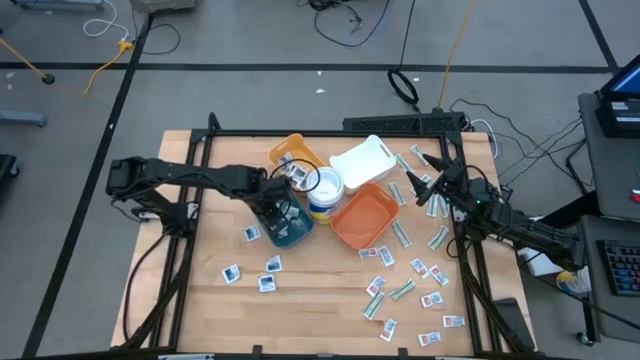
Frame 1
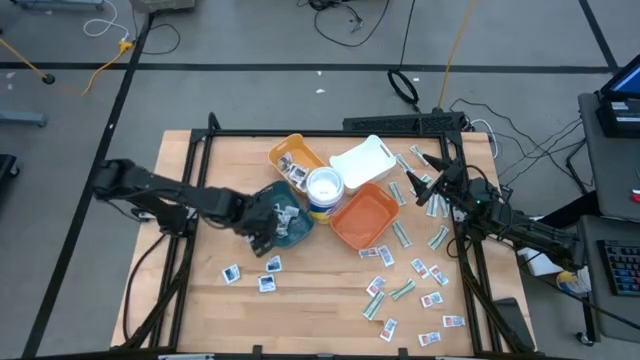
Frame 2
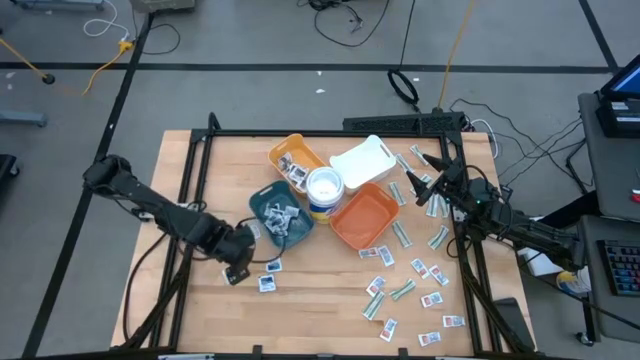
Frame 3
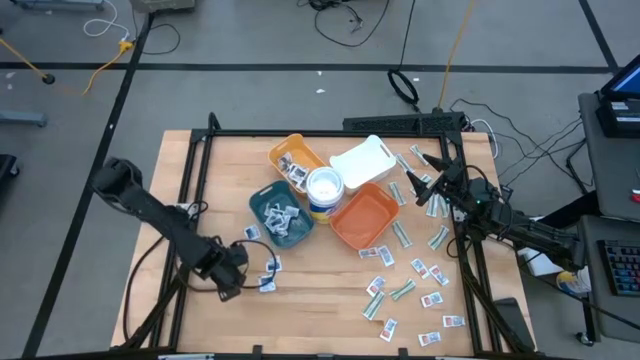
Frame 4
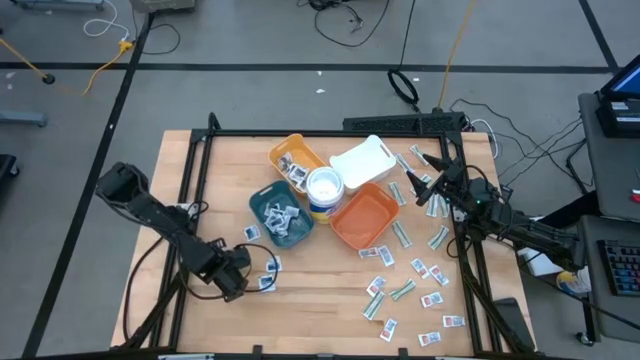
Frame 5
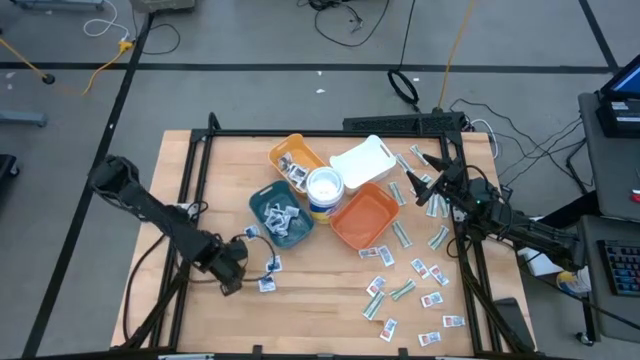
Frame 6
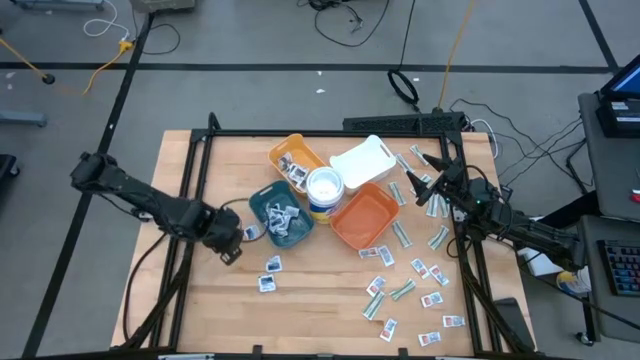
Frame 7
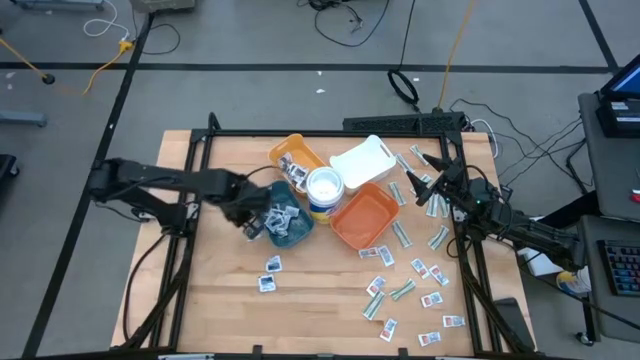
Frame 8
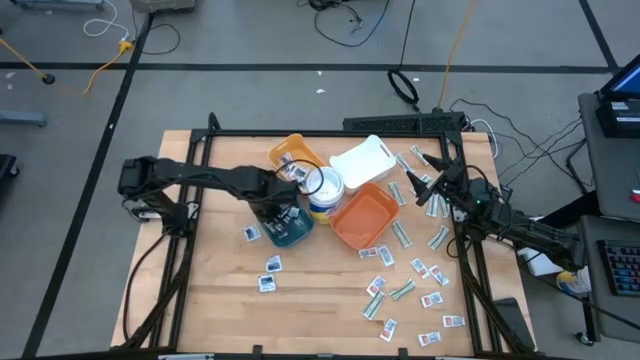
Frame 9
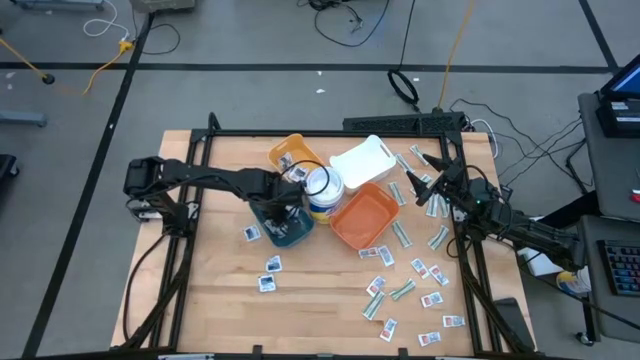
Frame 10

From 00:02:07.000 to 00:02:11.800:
Task: Pick & Place First Aid Supplies
Put the blue pad into the blue bin

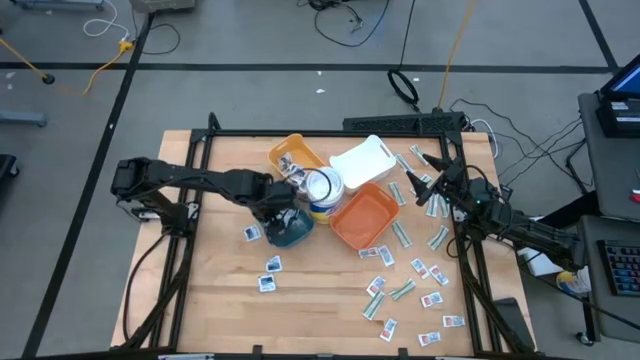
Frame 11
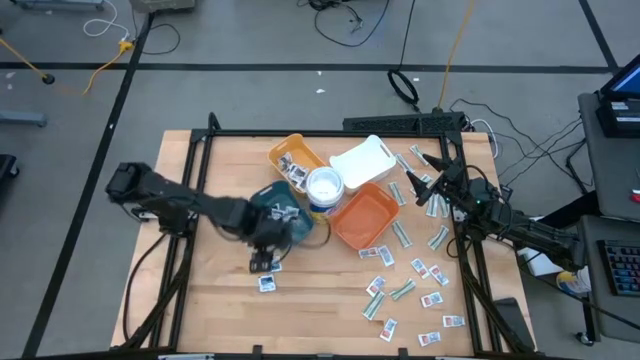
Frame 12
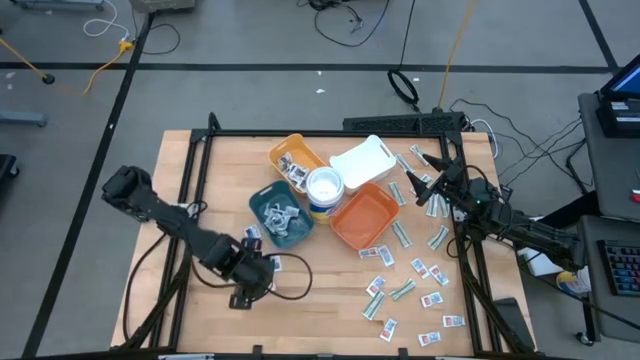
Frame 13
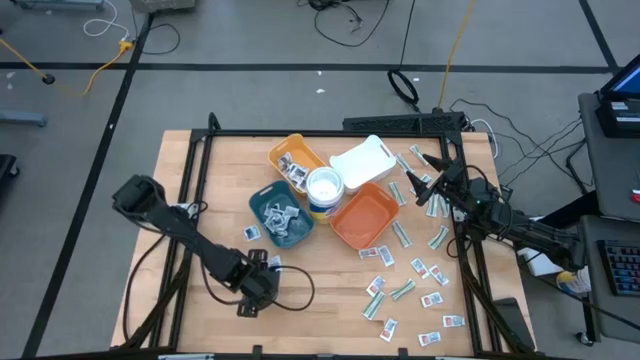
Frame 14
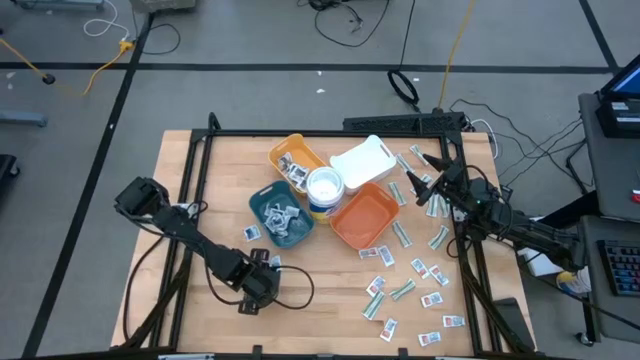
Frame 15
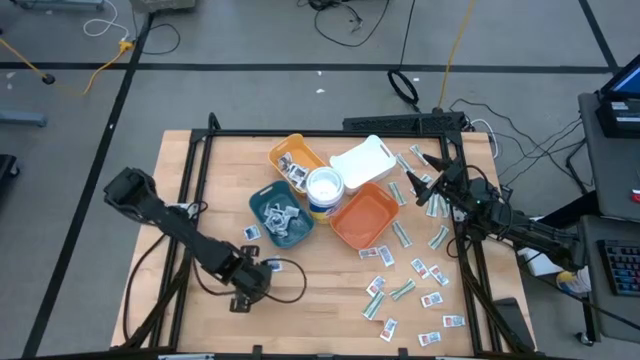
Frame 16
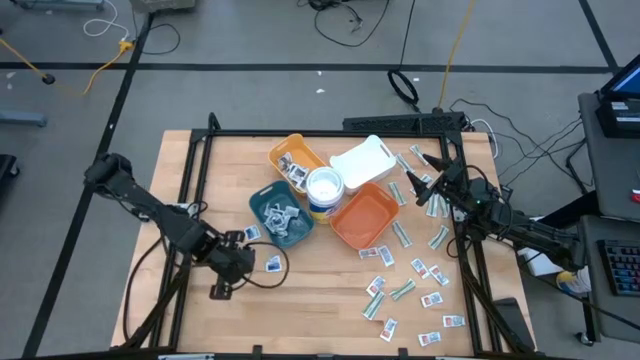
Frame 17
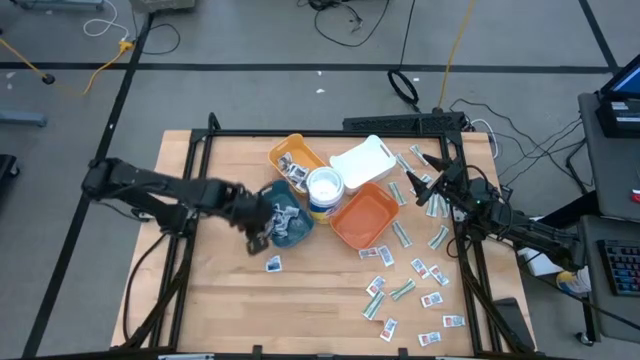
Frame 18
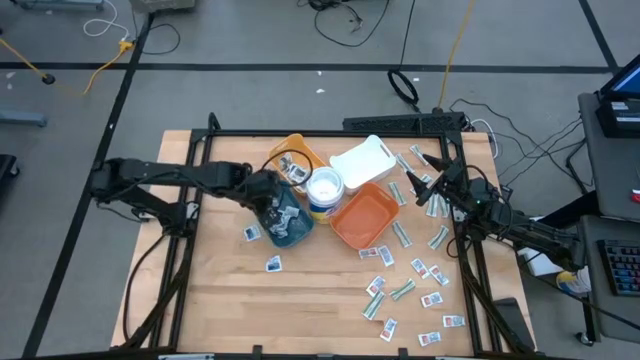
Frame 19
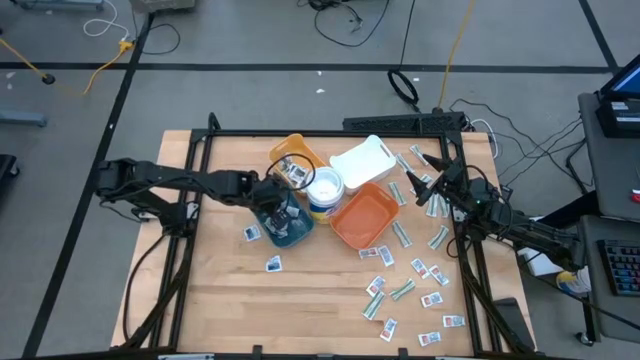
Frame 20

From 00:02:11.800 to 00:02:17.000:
Put the blue pad into the blue bin

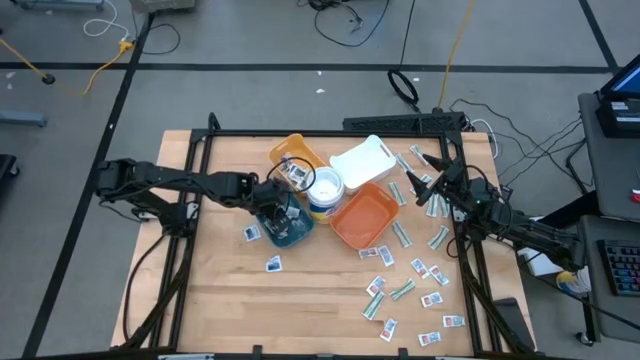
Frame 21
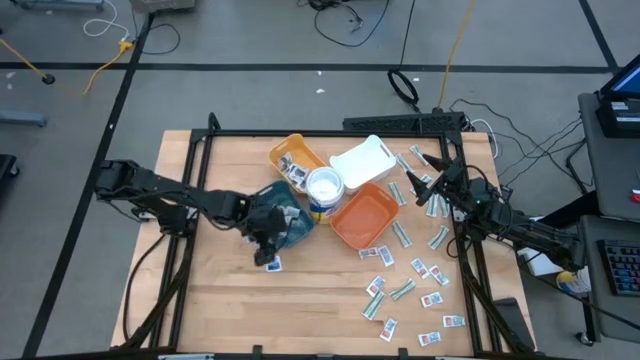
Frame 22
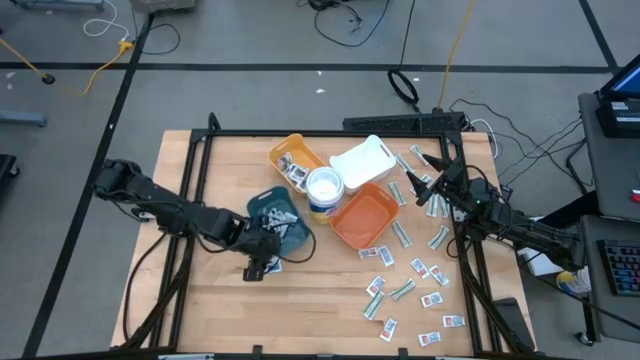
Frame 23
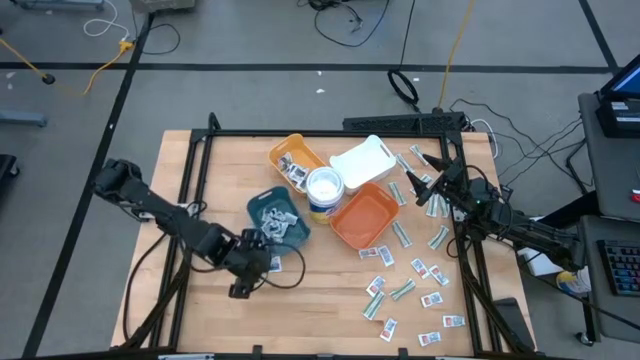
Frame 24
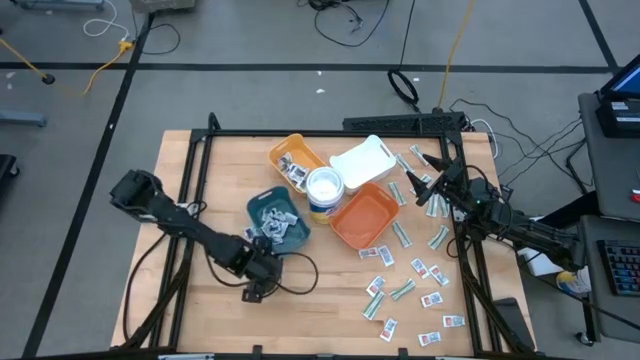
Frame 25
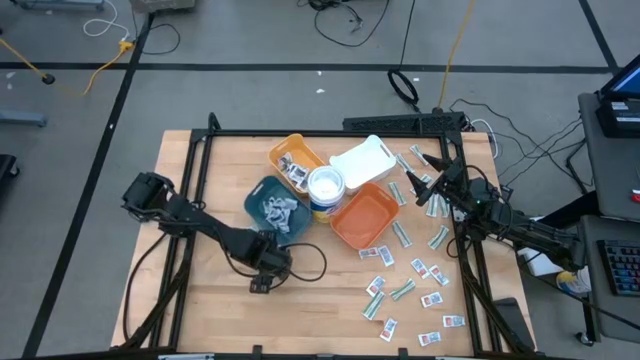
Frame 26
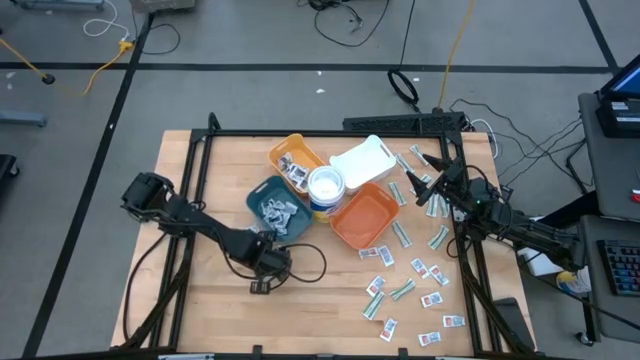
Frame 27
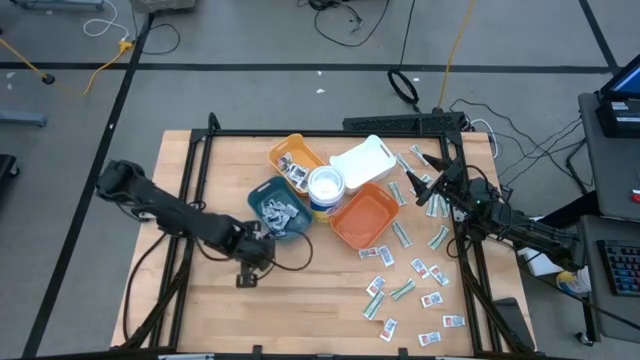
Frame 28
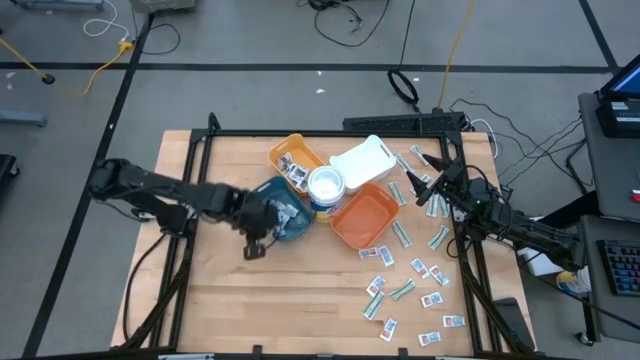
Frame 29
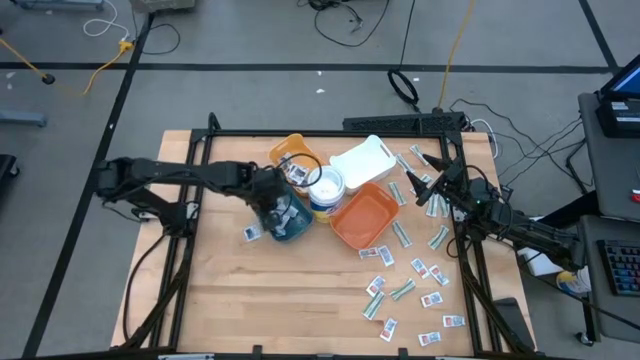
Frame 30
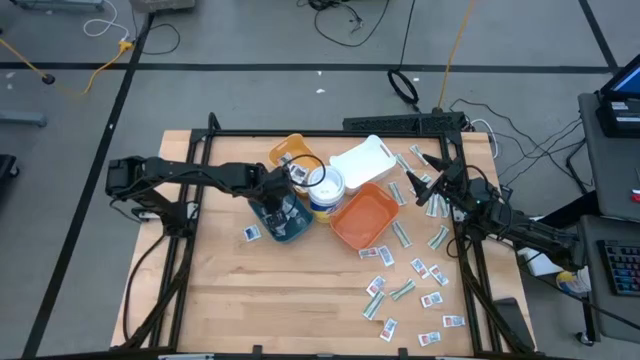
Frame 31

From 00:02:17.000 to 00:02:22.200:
Put the blue pad into the blue bin

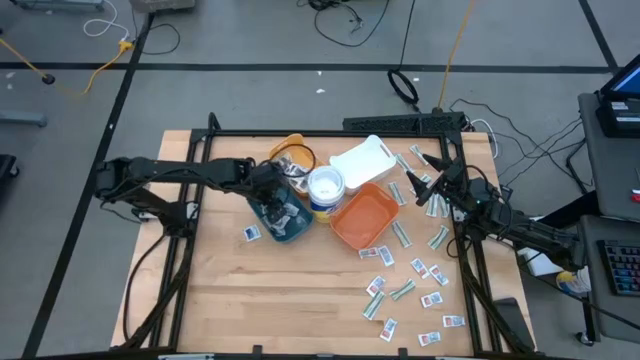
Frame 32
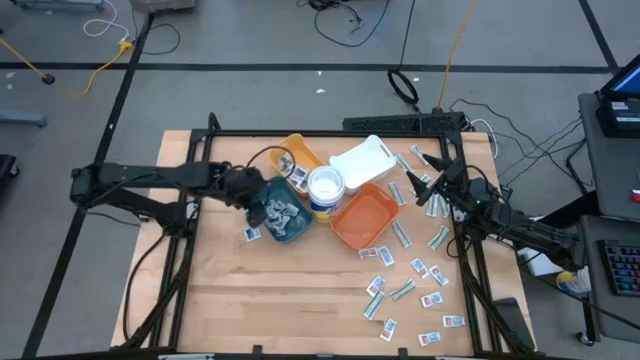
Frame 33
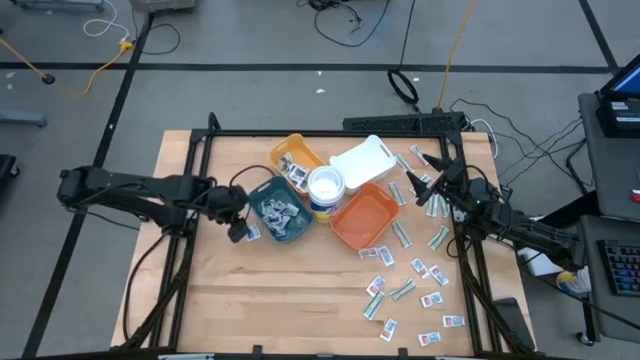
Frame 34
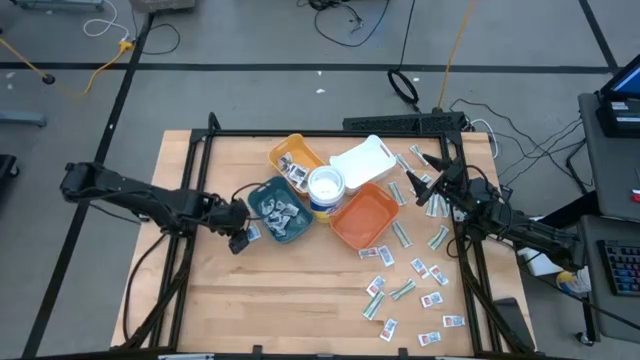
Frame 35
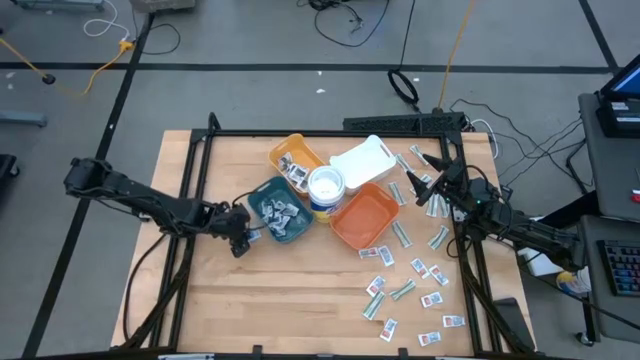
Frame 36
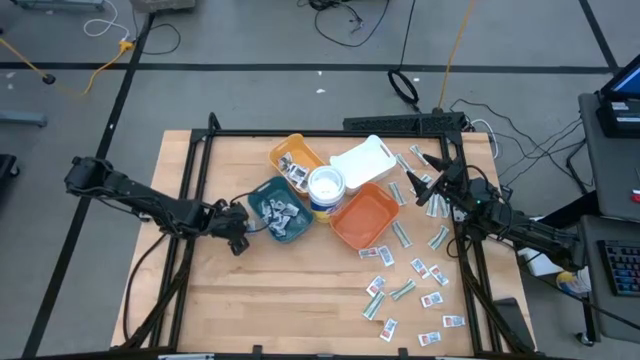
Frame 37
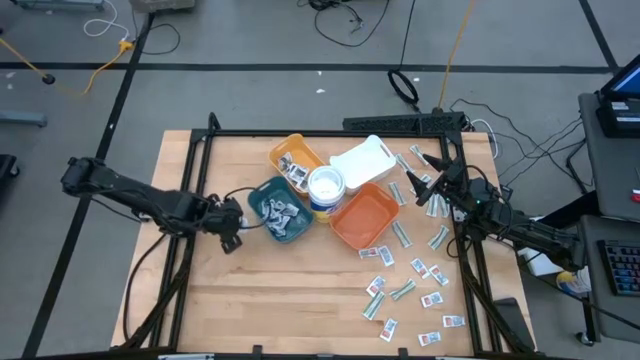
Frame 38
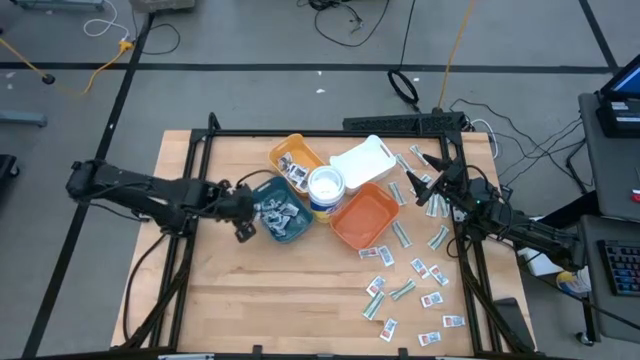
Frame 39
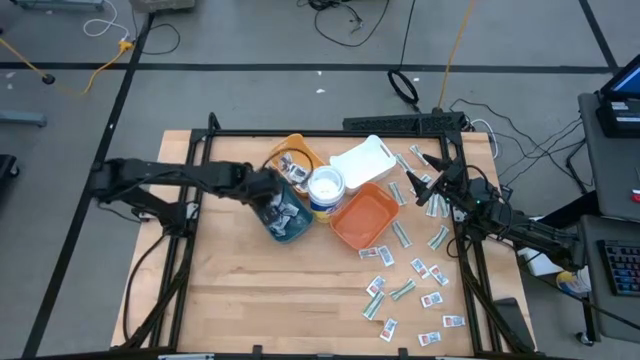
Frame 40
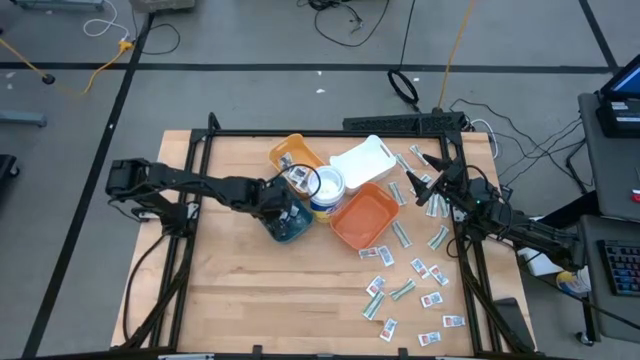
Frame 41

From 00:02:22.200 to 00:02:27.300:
Put the blue pad into the blue bin
